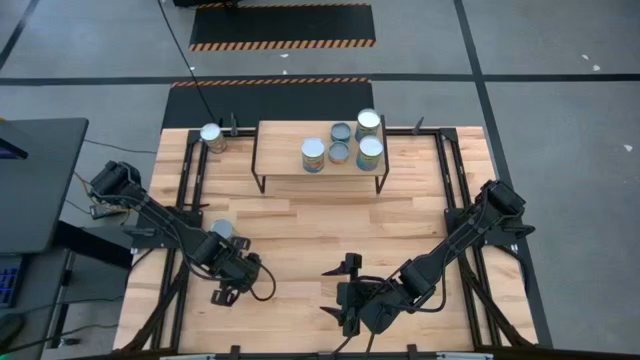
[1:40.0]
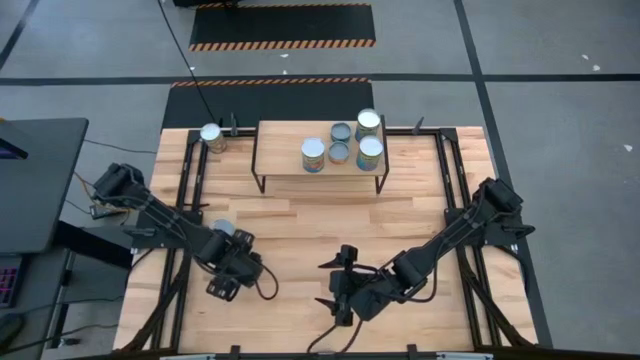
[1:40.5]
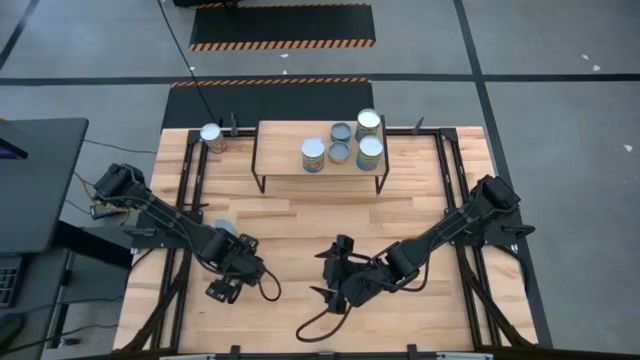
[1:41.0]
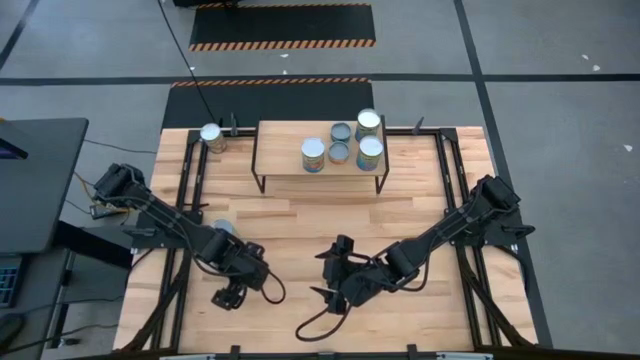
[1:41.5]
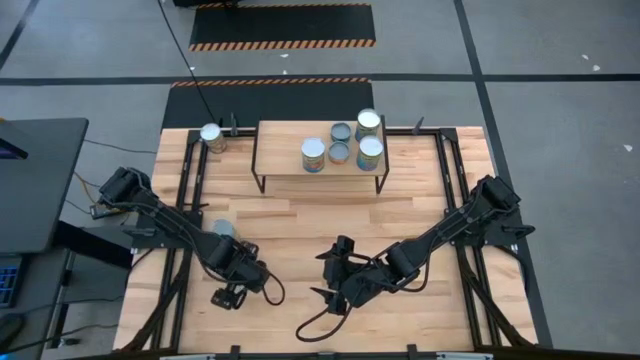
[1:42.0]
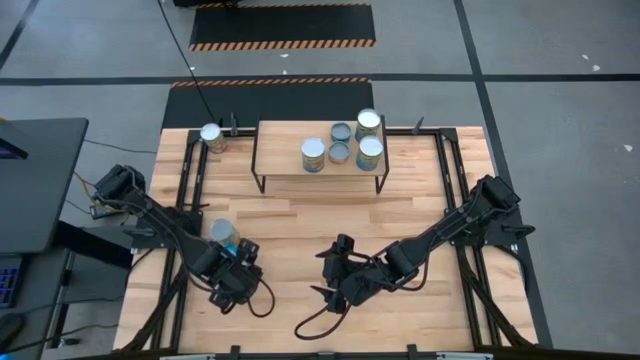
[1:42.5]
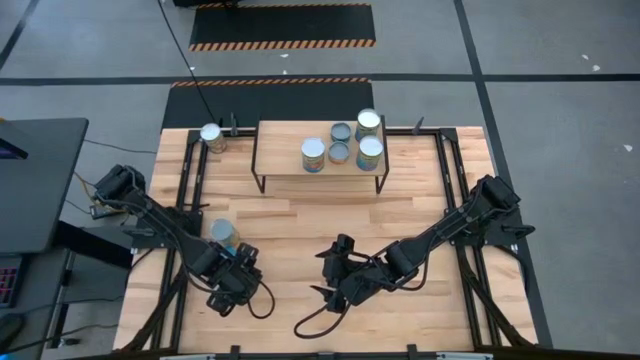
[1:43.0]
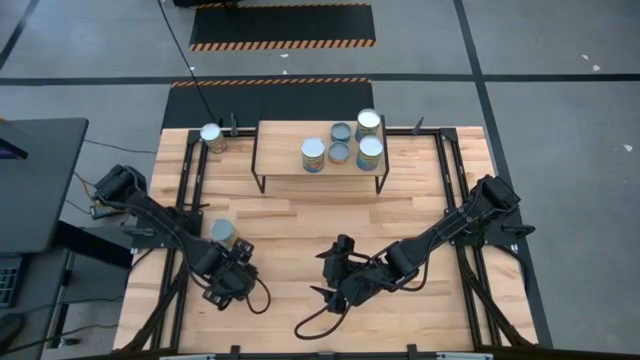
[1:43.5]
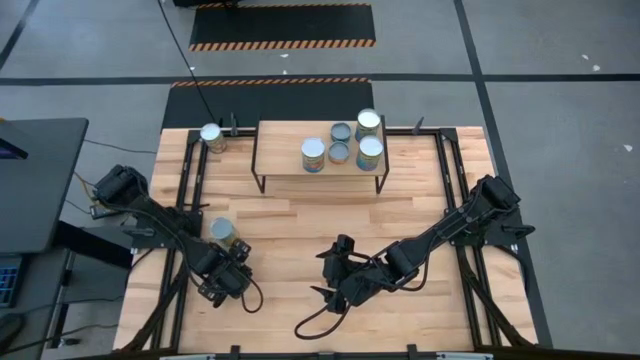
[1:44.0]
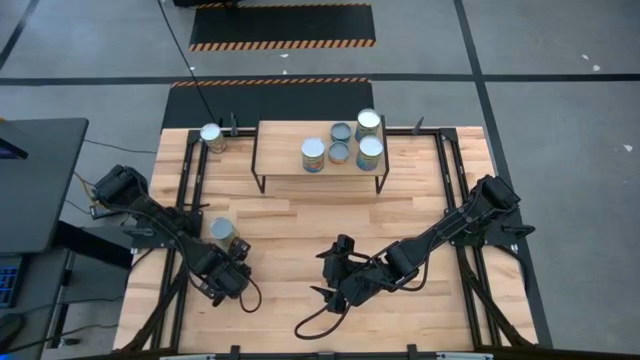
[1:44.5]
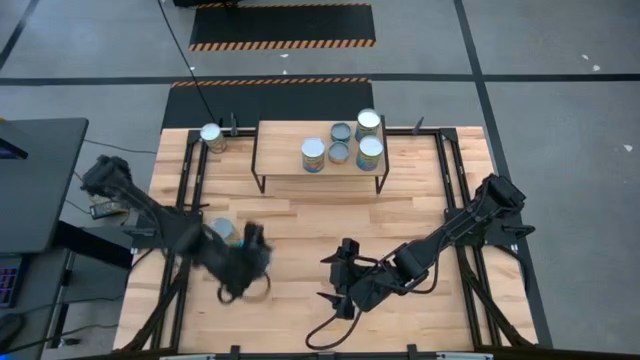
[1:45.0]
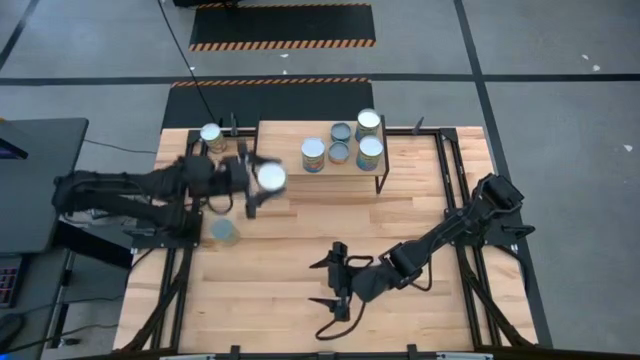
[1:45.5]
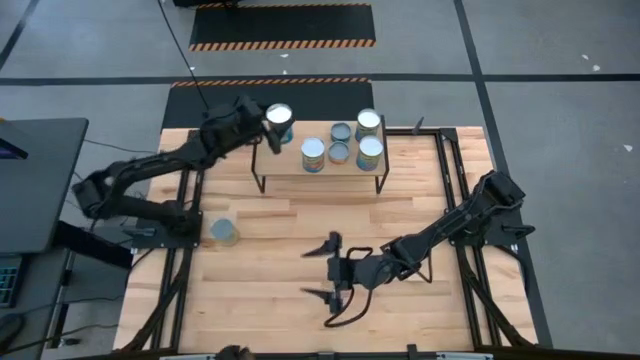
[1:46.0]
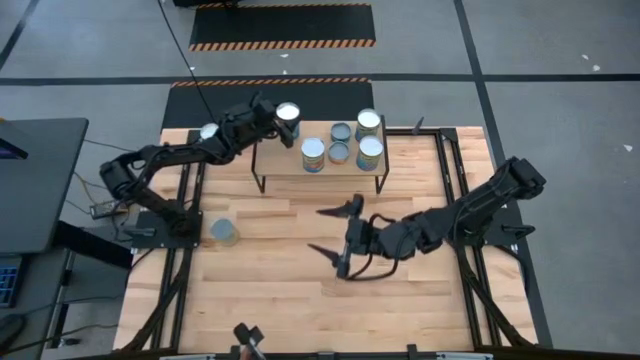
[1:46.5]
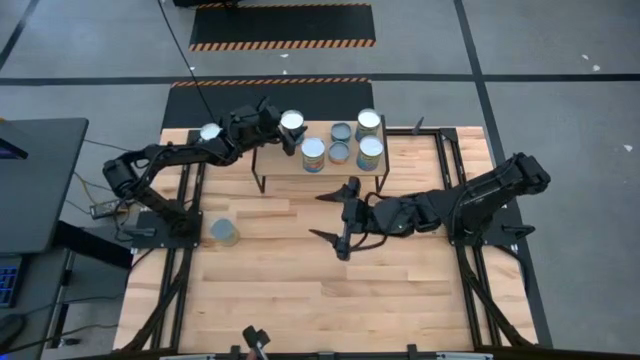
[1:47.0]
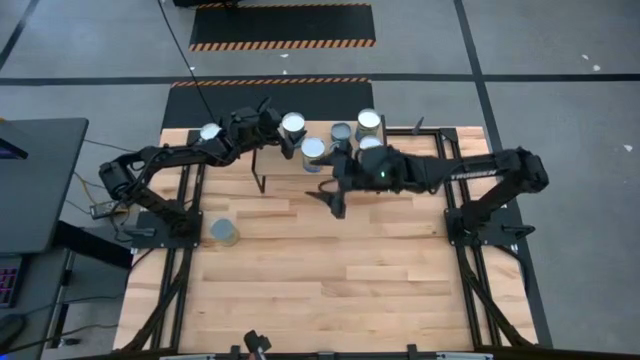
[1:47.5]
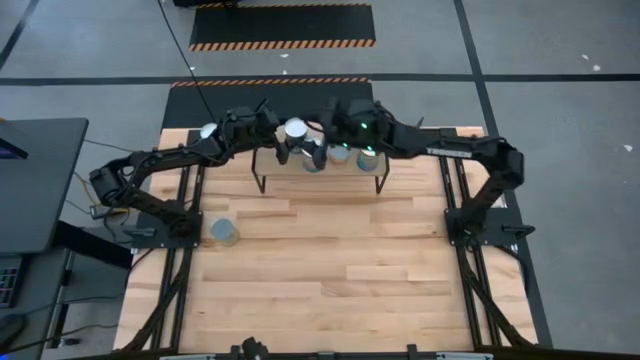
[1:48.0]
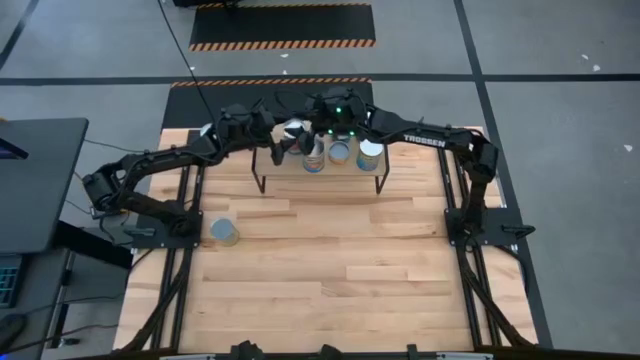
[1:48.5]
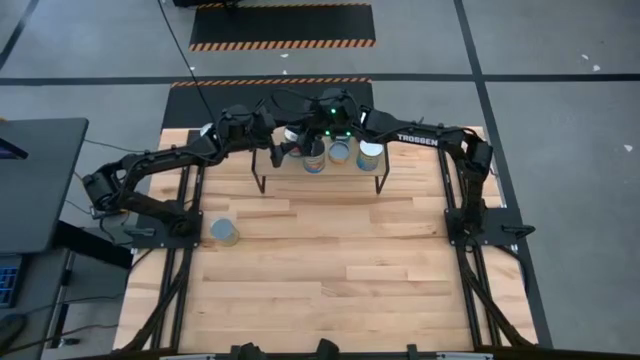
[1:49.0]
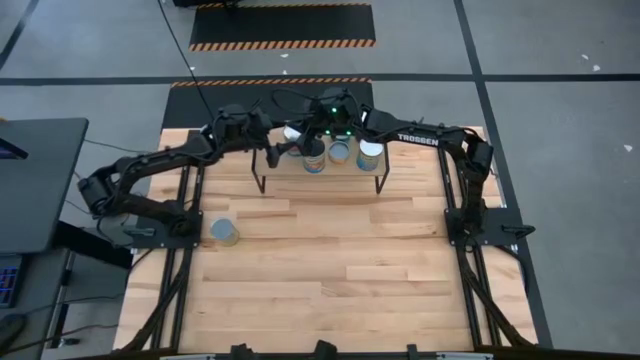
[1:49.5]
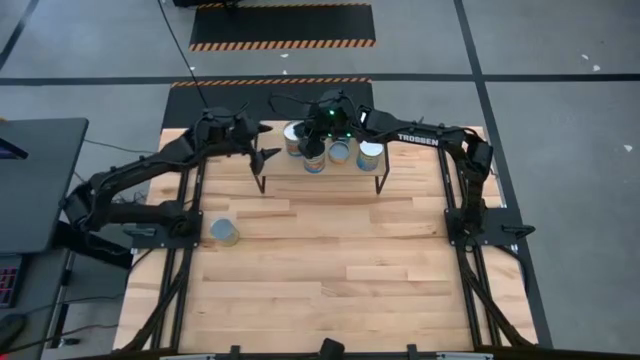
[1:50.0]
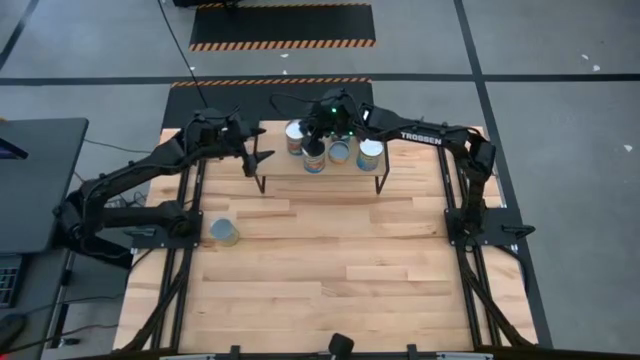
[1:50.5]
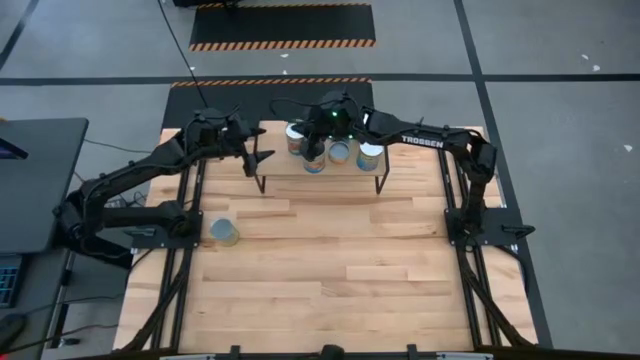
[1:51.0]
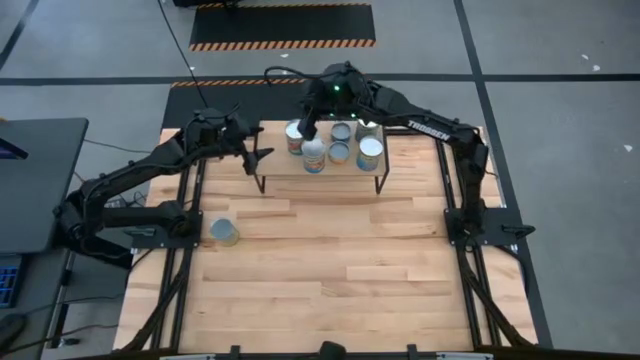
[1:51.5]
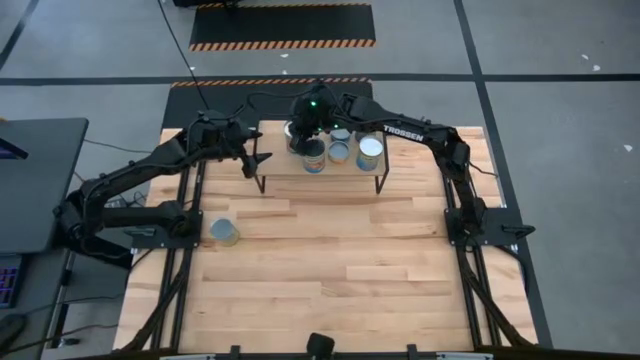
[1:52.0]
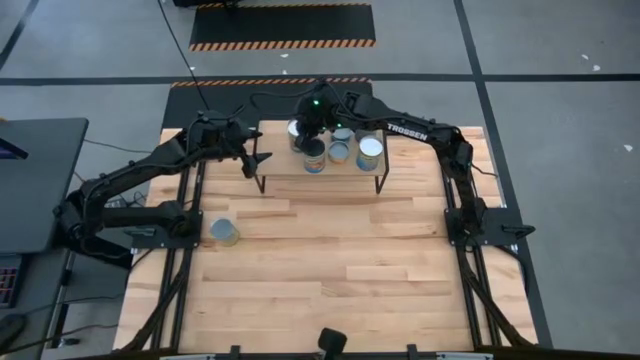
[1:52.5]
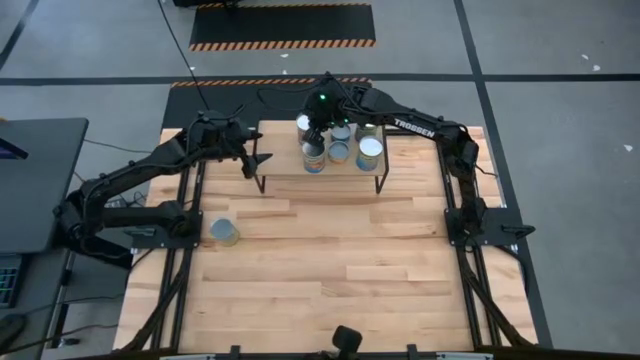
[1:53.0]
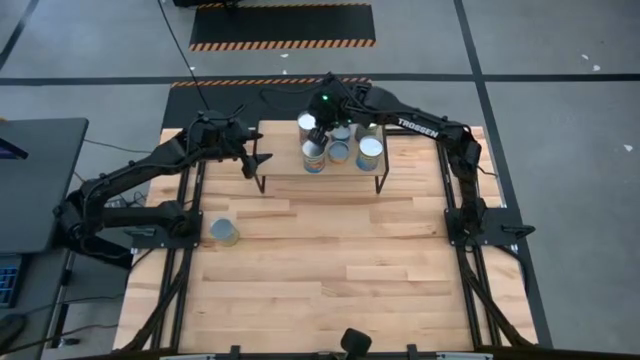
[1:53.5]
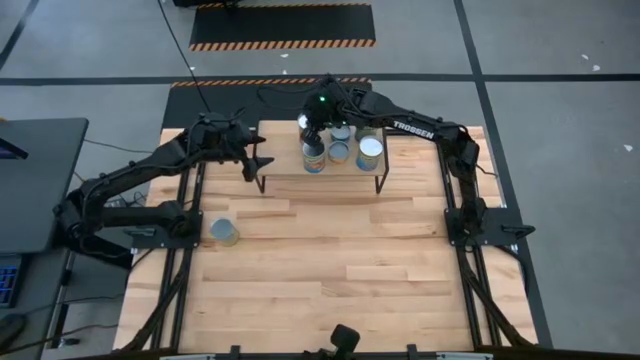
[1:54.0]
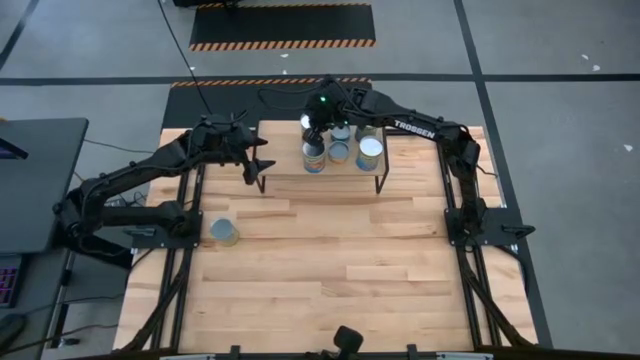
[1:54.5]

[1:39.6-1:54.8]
Task: Pick and place cans onto a shelf
Put the big blue canned tomatoes on the shelf aligned with the other big blue canned tomatoes

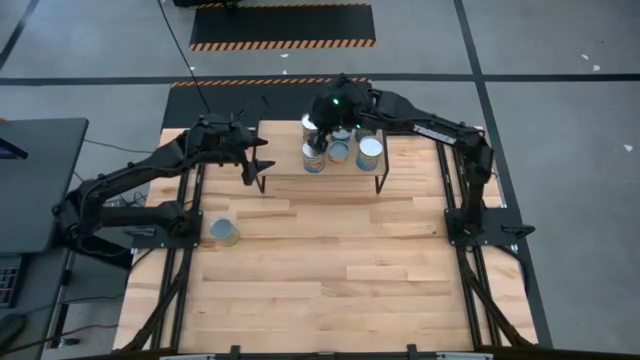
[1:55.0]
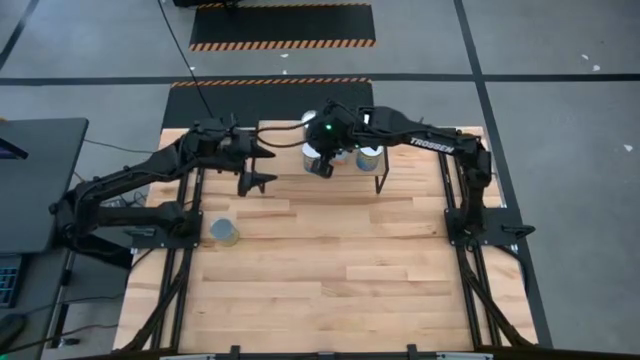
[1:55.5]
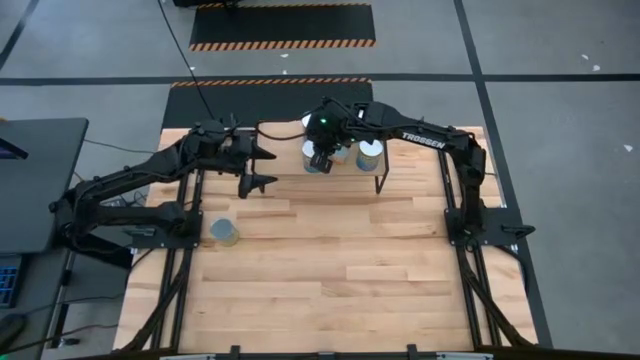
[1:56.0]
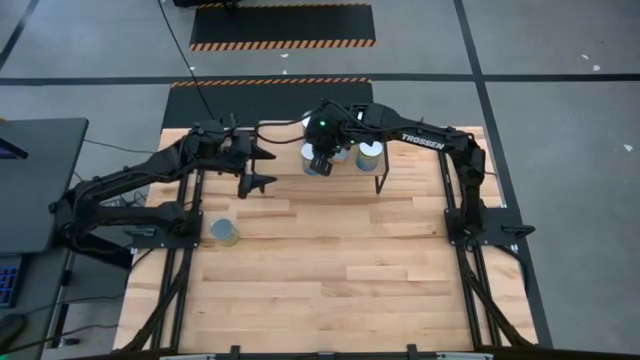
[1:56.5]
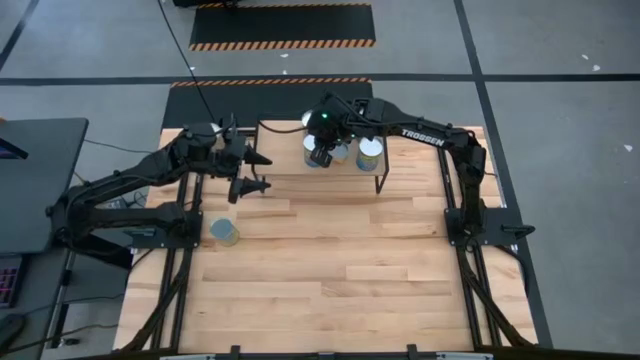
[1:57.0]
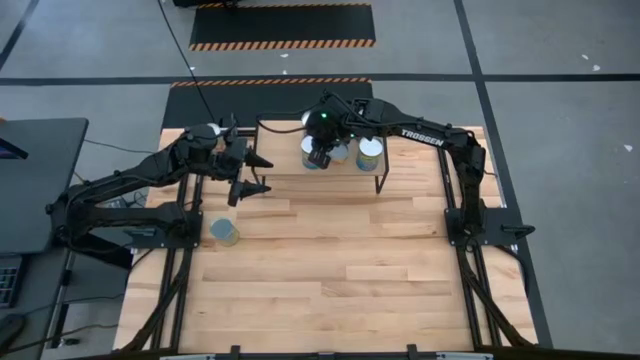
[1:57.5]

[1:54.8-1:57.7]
Adjust the big blue canned tomatoes on the shelf

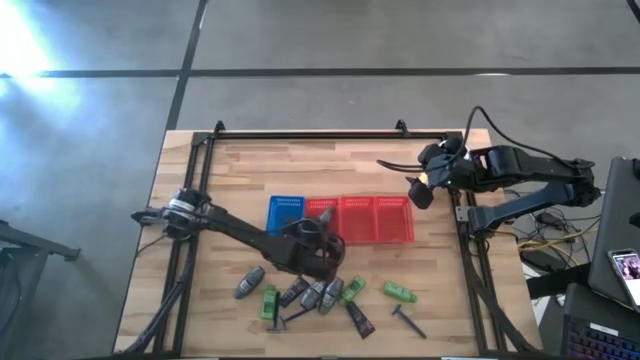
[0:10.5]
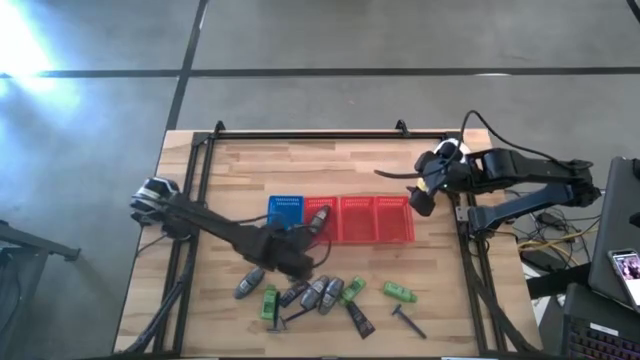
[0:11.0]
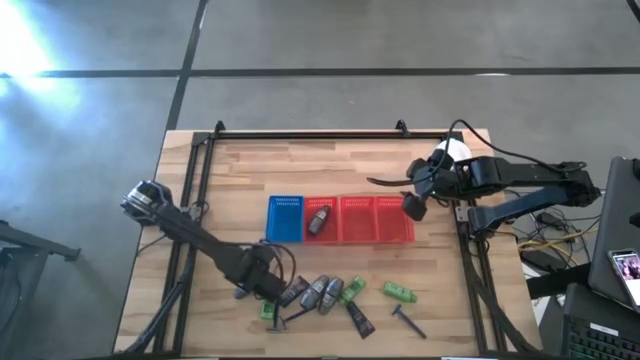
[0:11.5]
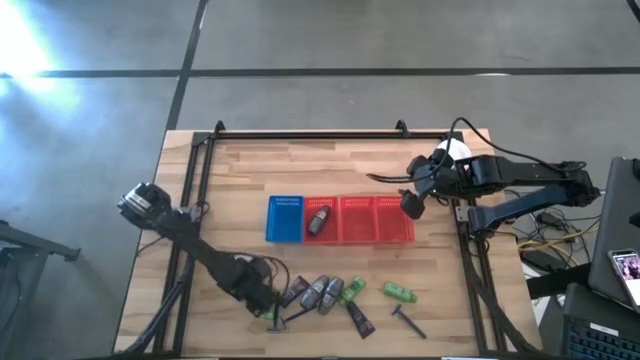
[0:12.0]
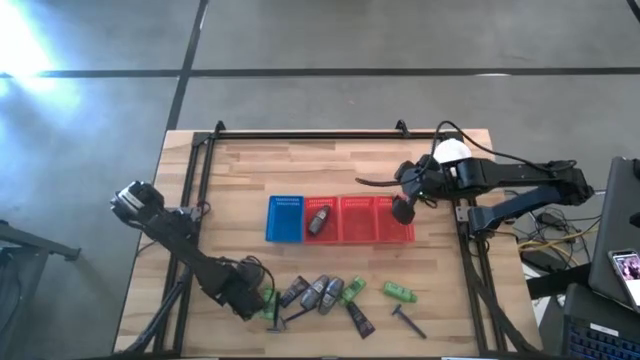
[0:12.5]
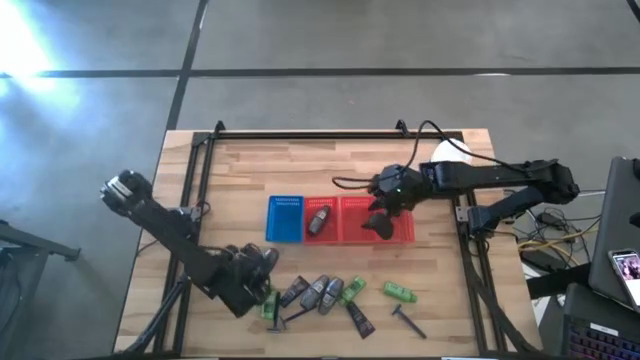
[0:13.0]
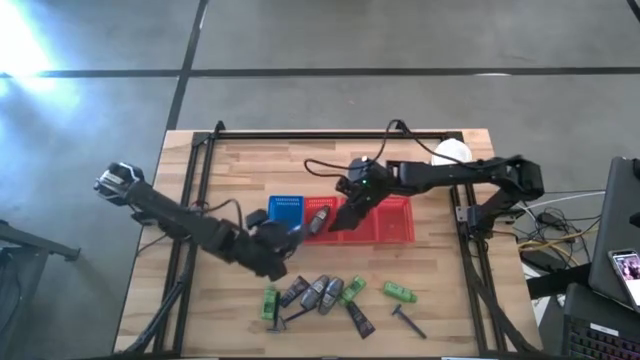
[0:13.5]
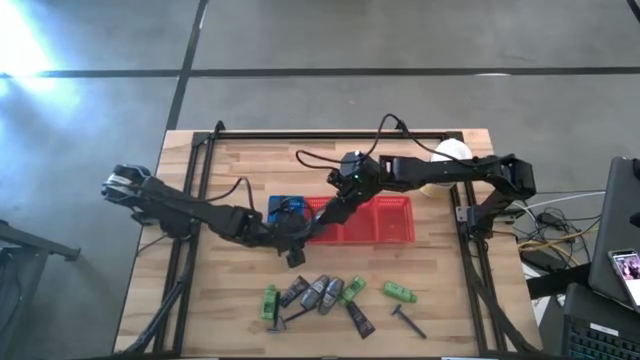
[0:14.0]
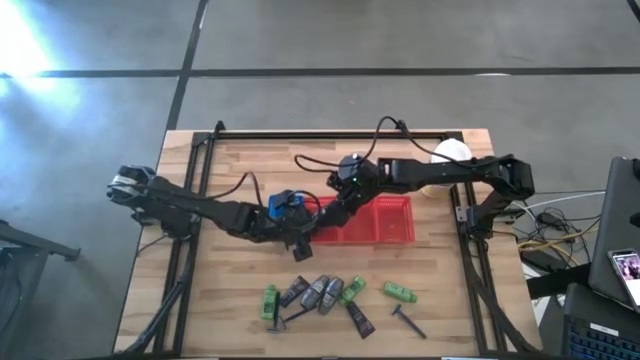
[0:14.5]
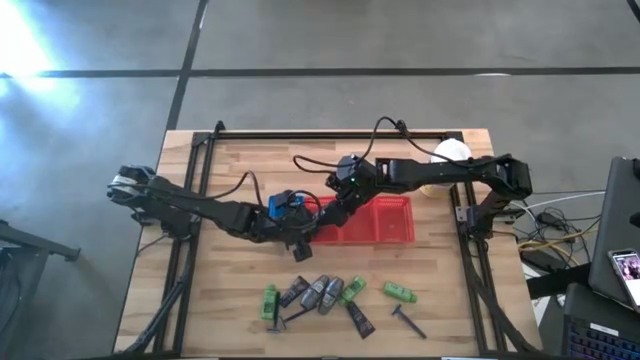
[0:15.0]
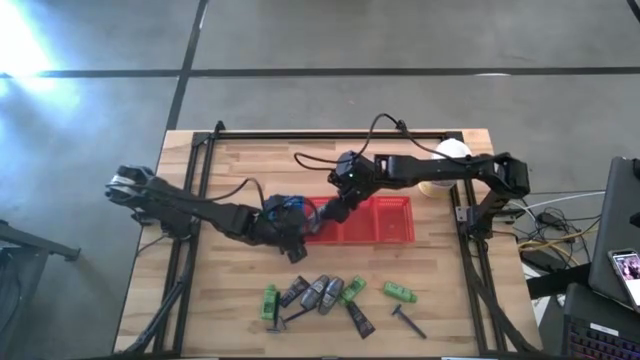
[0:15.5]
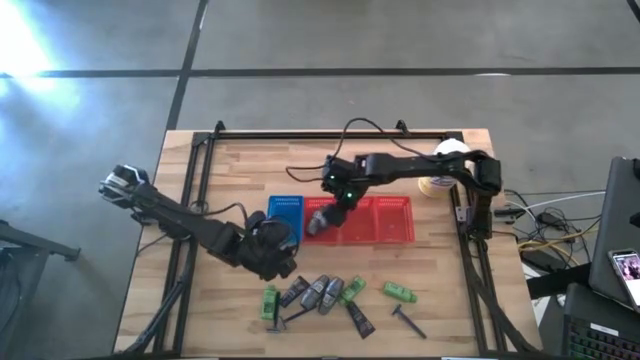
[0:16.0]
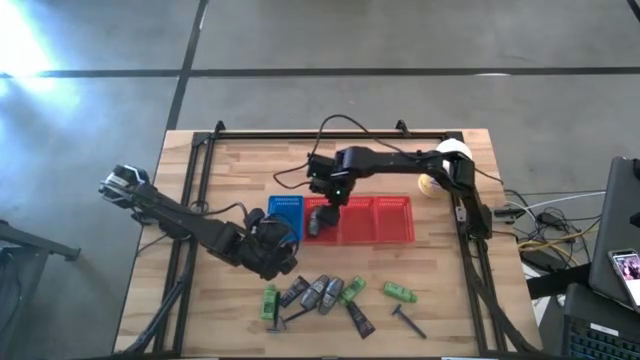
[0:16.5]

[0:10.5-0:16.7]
Task: Pick & Place Travel size toiletries
Put the black deodorant into the left red bin
